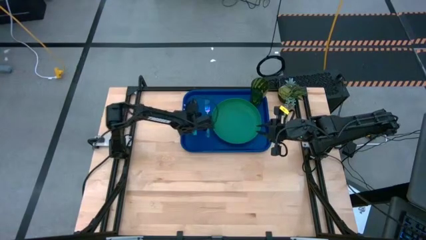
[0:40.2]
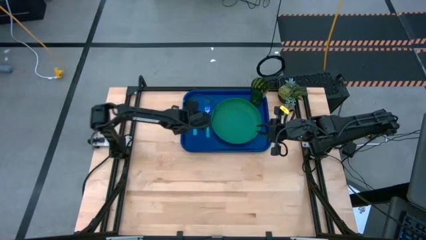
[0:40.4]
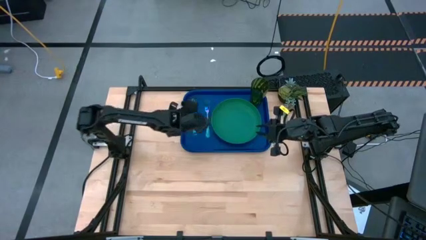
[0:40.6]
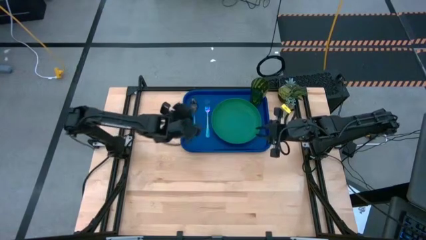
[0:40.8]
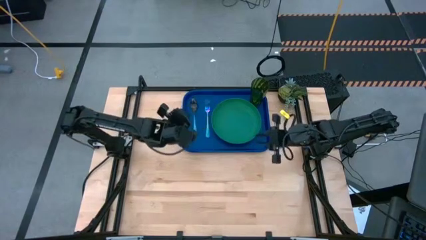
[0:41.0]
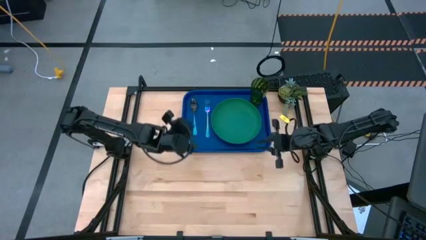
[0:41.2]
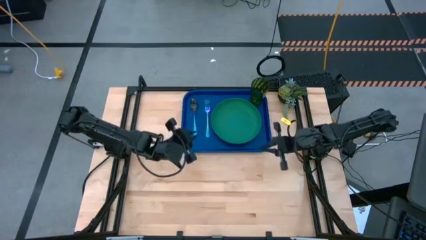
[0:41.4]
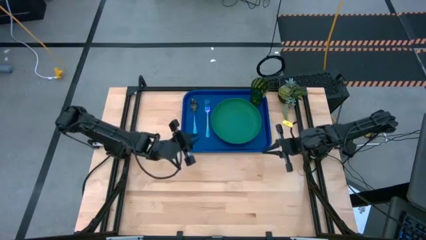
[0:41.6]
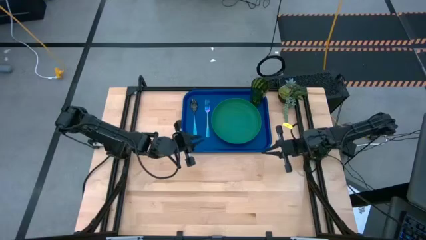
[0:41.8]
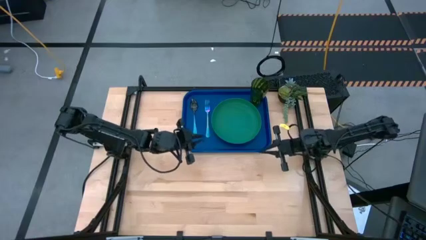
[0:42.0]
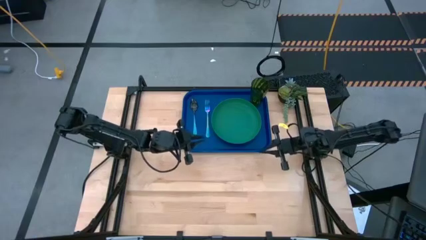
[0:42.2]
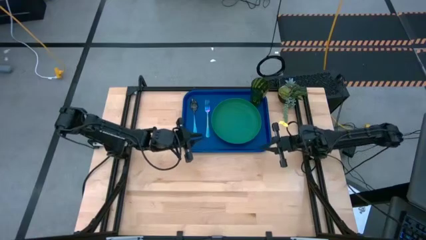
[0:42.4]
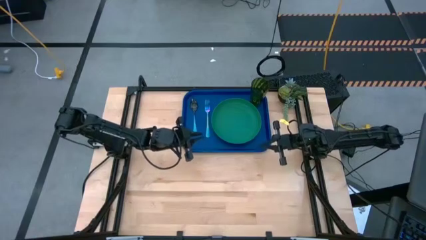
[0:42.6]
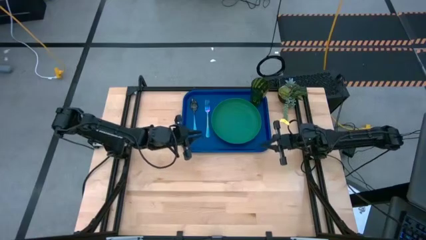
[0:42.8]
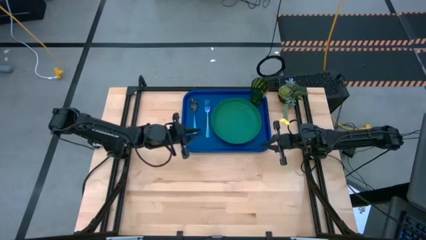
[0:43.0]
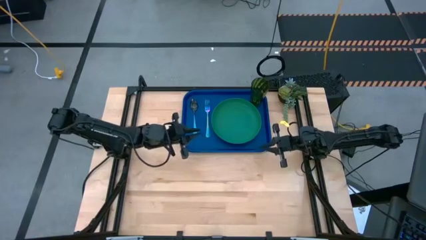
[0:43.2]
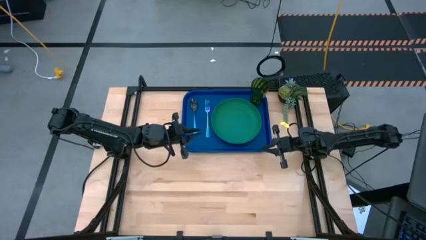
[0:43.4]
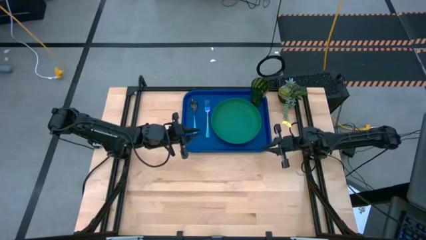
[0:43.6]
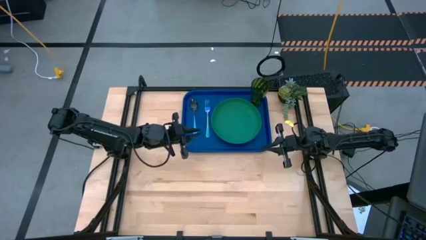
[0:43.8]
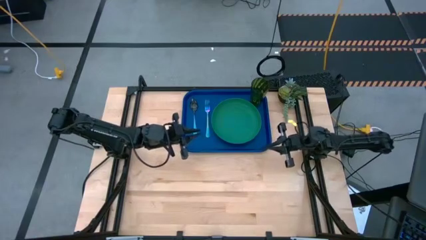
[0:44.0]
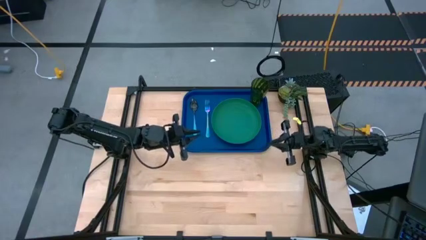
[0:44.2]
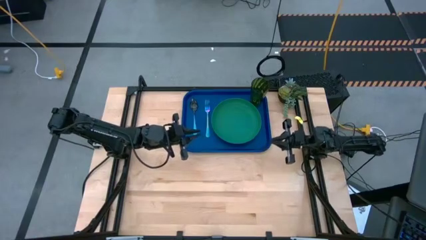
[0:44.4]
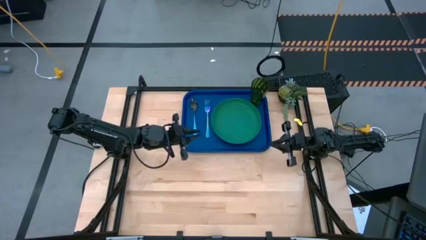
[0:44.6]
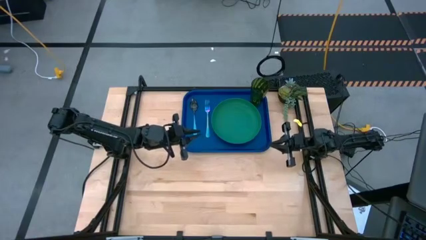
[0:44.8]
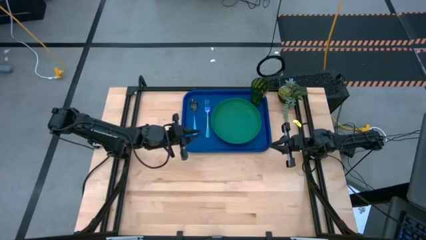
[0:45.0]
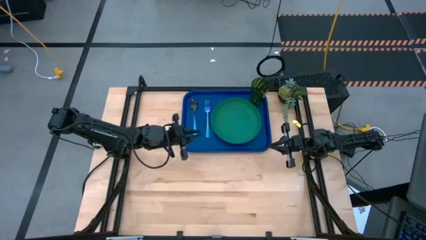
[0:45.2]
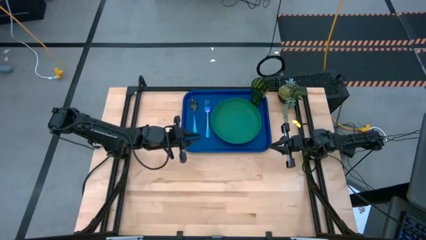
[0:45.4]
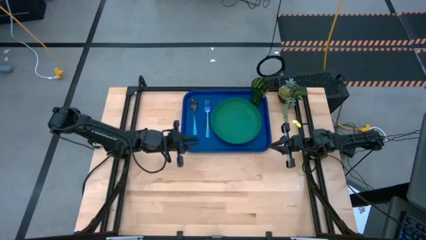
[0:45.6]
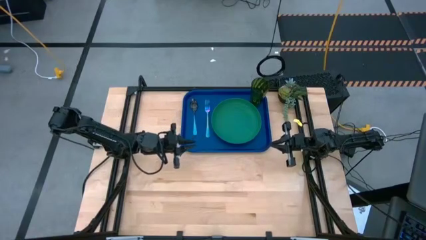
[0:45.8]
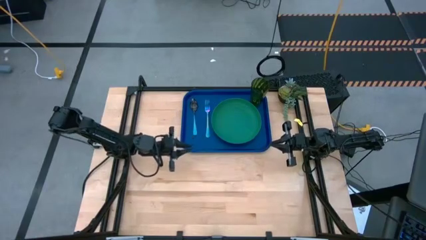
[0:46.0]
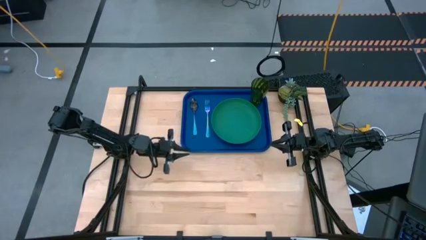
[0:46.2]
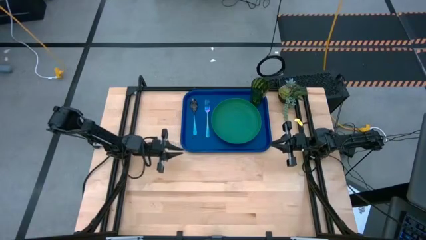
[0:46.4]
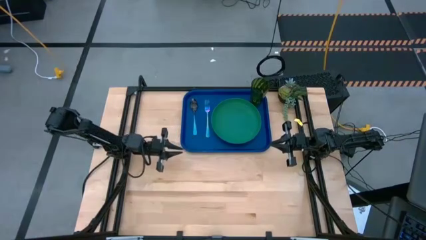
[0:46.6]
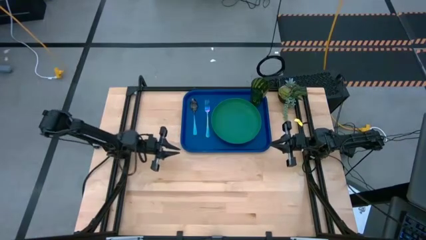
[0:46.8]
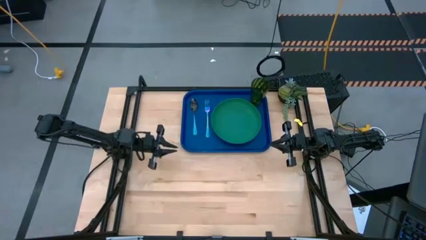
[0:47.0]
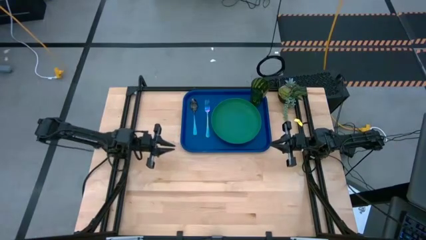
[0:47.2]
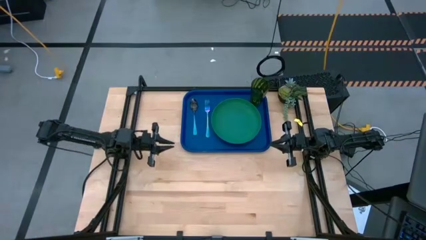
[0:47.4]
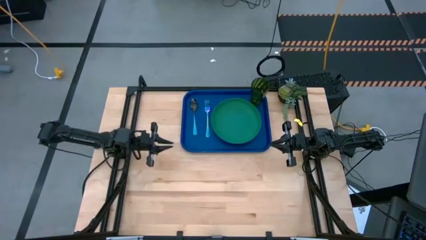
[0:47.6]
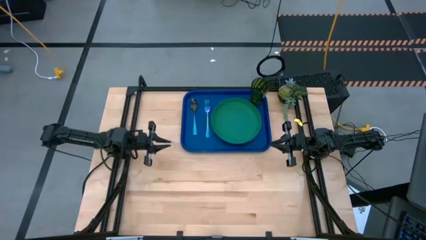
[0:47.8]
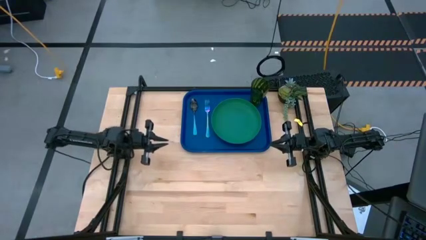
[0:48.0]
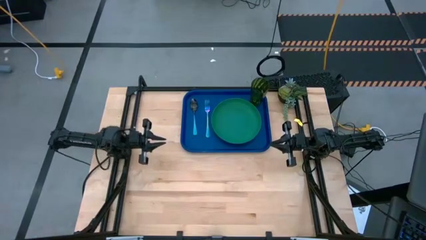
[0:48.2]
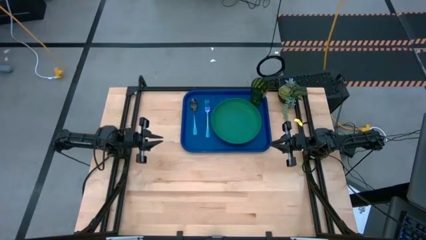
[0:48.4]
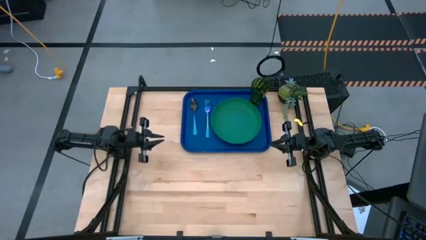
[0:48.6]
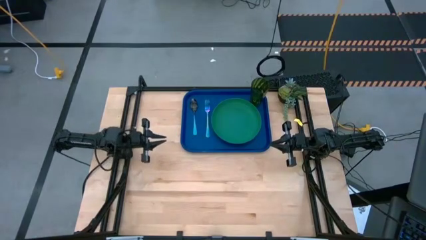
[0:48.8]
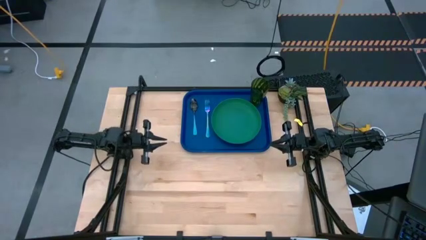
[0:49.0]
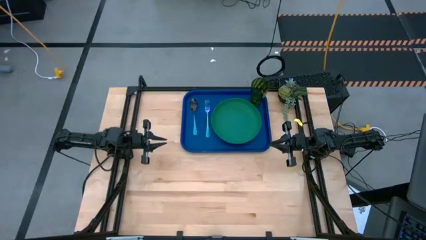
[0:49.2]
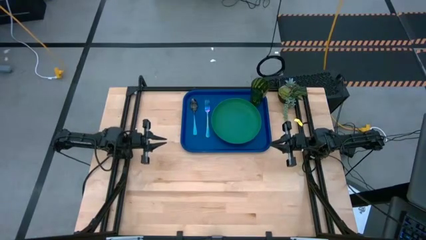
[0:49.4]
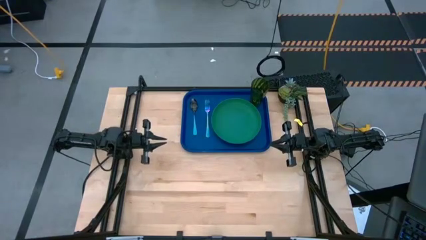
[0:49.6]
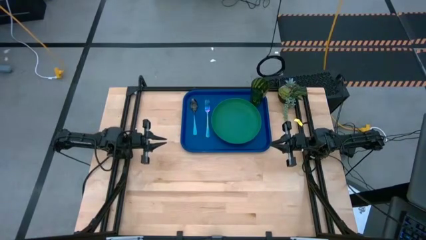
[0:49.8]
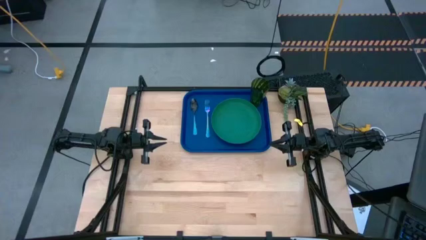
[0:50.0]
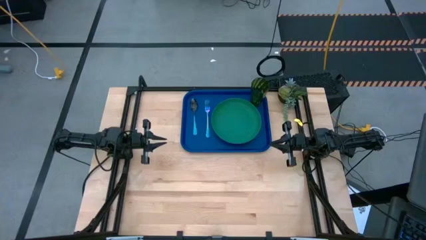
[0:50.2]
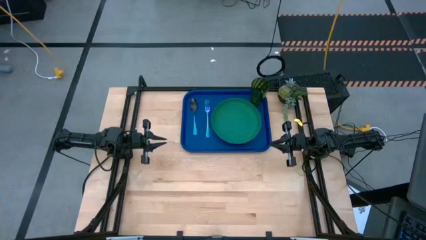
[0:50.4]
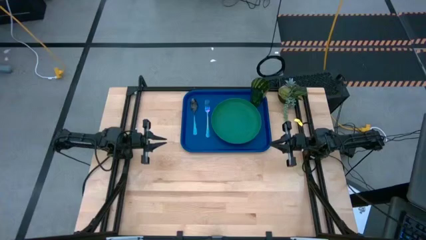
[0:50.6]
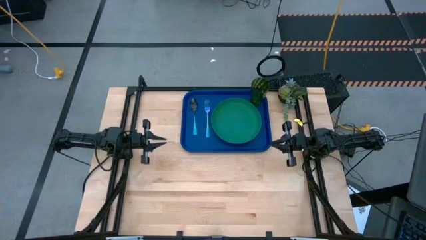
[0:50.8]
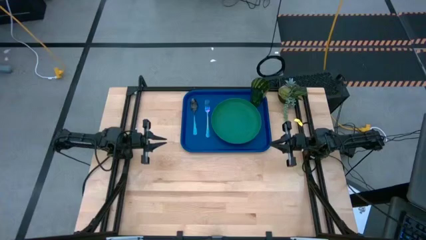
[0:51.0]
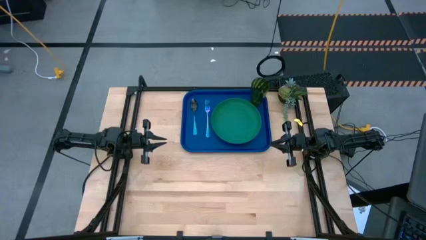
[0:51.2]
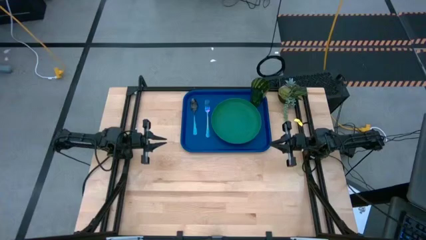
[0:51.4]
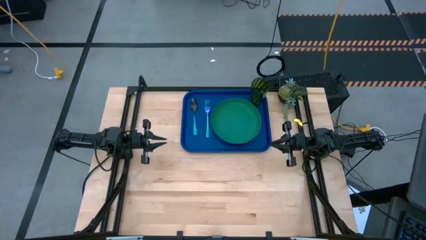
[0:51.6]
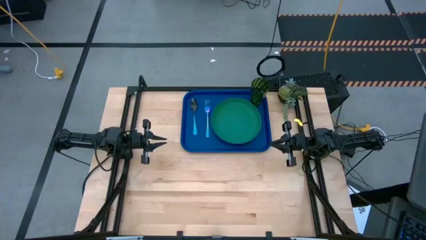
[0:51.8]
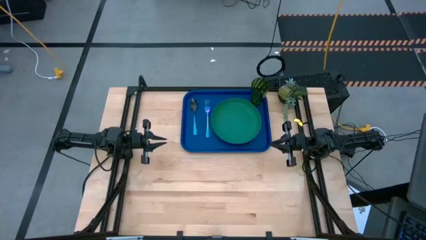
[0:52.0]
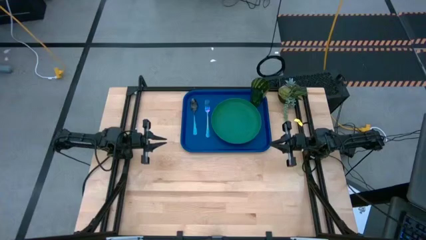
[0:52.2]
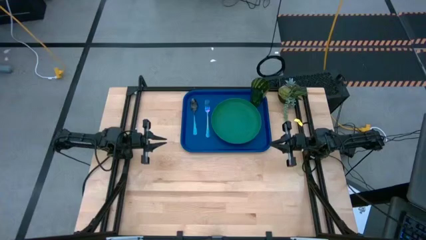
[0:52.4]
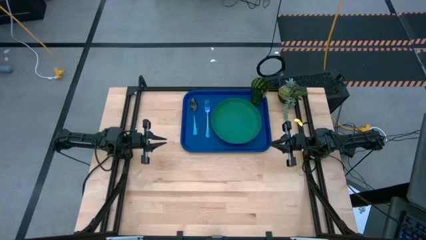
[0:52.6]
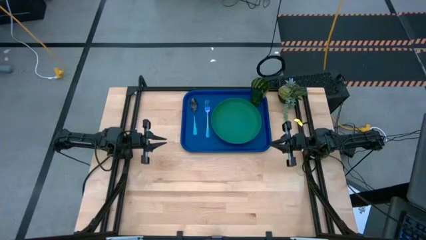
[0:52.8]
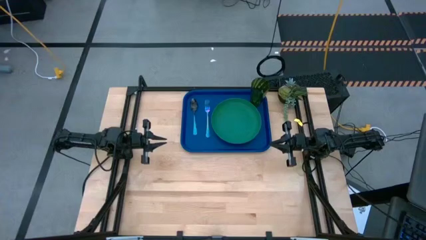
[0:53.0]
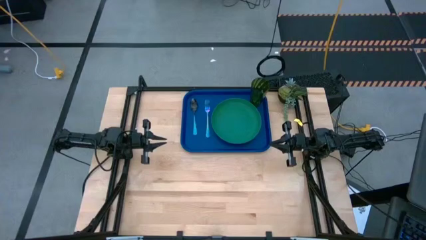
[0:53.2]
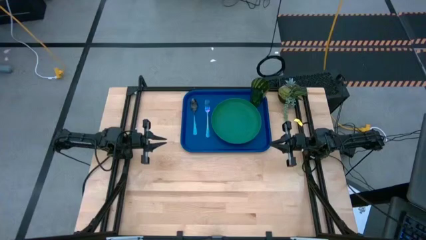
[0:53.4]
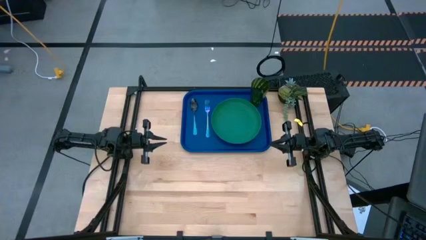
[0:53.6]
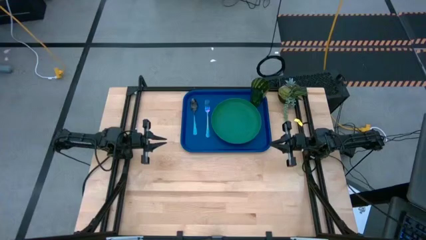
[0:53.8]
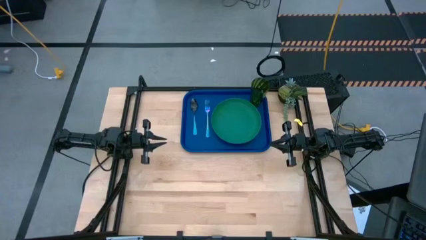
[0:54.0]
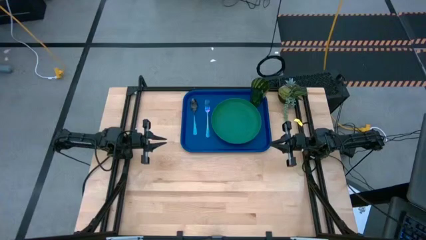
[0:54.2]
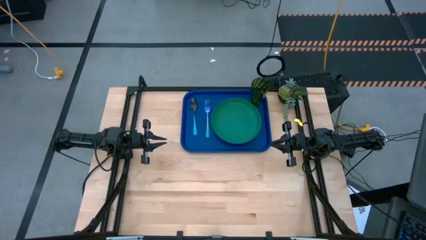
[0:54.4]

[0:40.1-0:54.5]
Task: Pick and place plate/cup/fork/spoon on tray
Return to Home Position

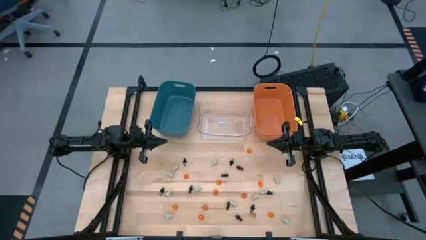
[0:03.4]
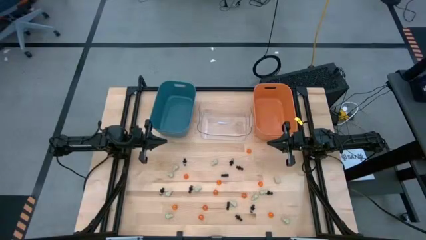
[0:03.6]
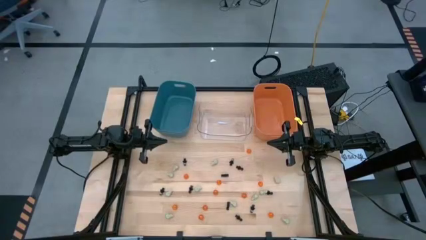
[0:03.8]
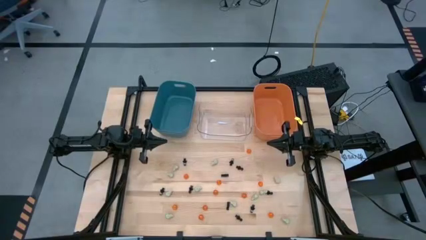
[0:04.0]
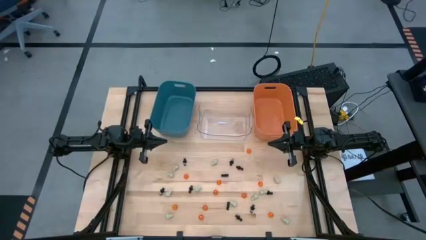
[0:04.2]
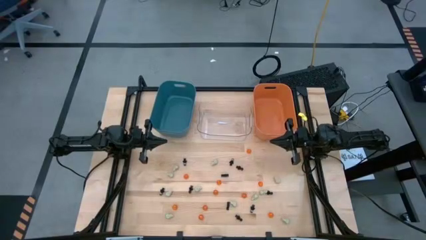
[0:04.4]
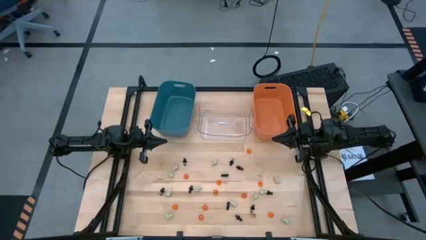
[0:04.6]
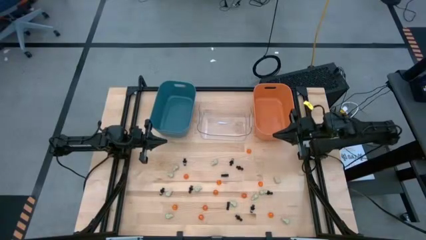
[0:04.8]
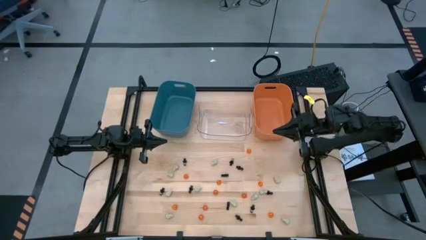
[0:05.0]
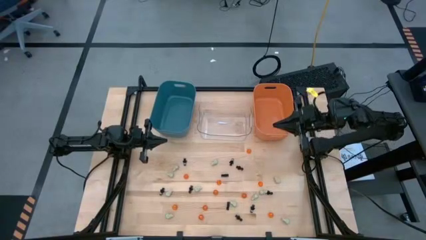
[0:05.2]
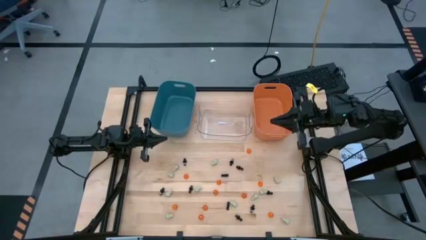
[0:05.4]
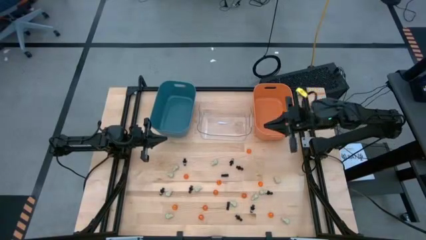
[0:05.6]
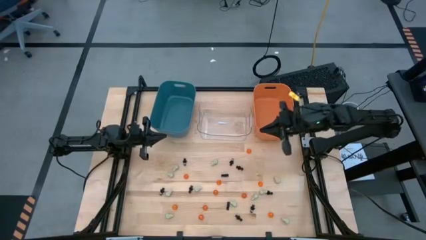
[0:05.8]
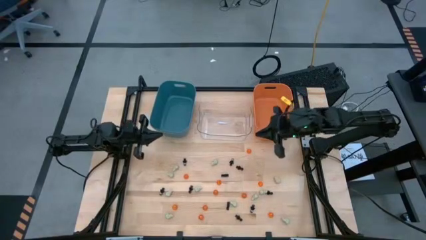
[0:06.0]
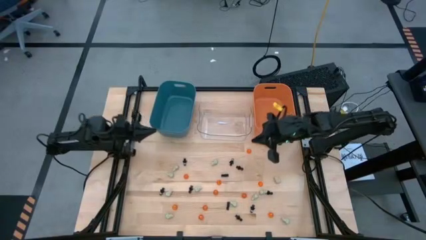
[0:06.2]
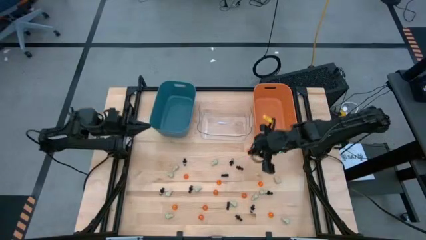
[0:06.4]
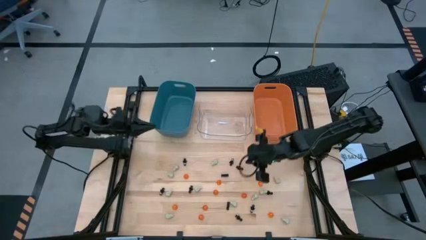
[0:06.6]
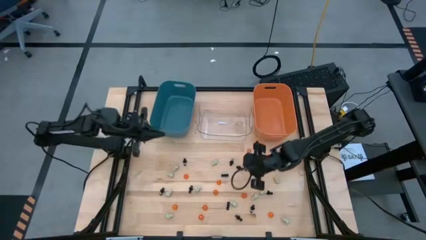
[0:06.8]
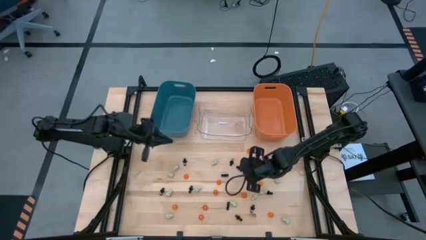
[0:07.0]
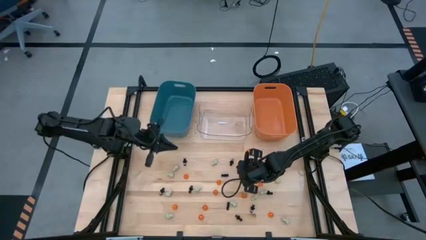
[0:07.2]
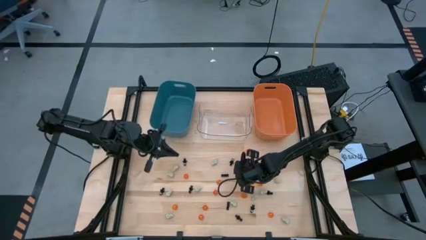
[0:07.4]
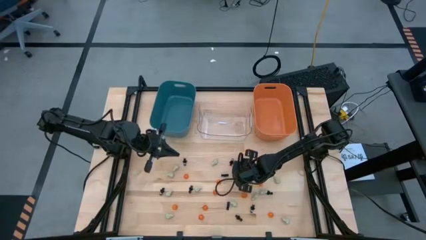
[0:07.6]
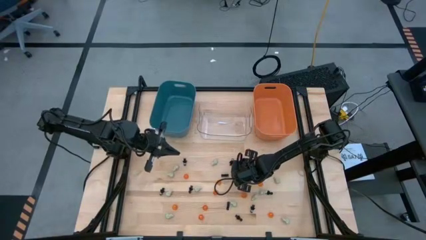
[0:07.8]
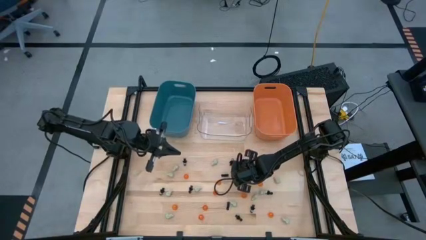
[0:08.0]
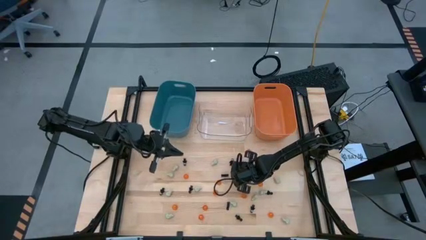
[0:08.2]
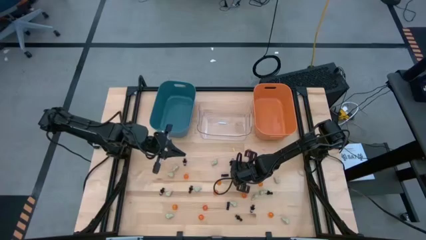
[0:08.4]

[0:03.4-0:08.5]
Task: Sort Halloween decoration
Put the black skeleton toy into the orange bin
